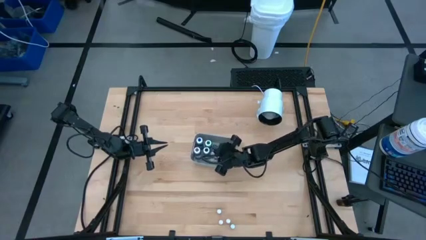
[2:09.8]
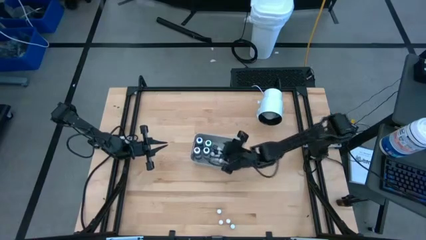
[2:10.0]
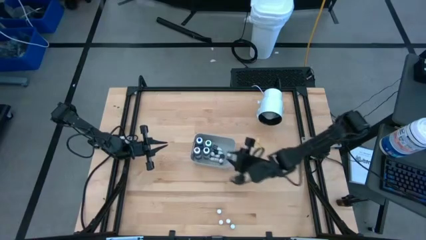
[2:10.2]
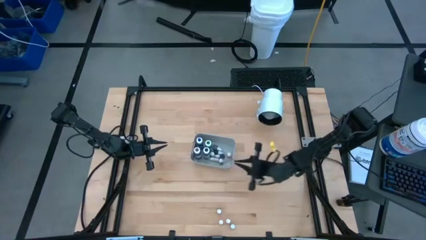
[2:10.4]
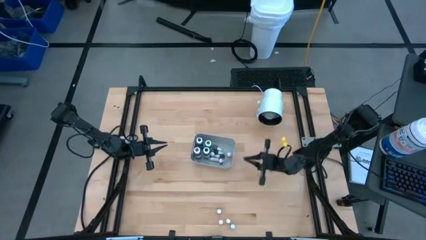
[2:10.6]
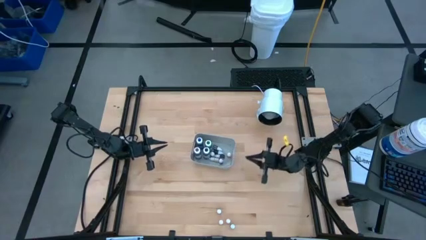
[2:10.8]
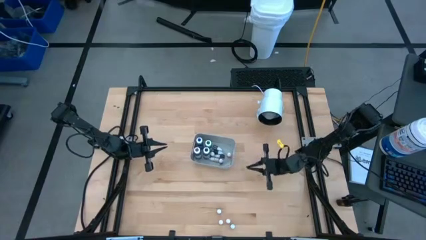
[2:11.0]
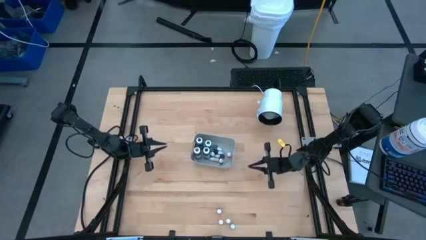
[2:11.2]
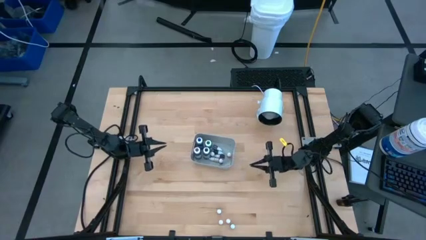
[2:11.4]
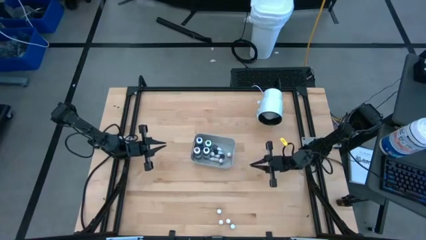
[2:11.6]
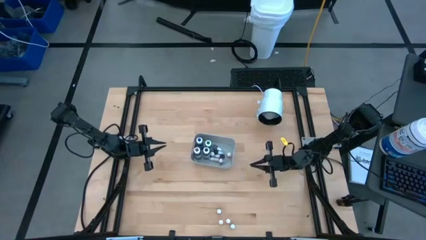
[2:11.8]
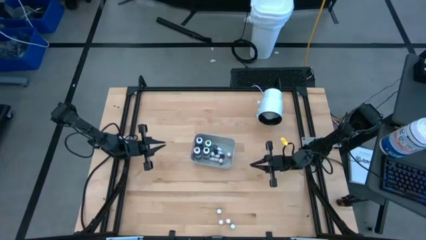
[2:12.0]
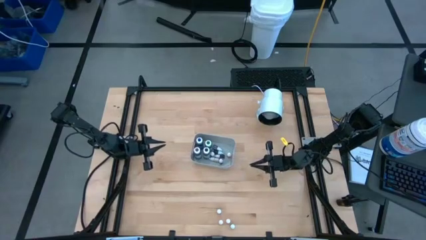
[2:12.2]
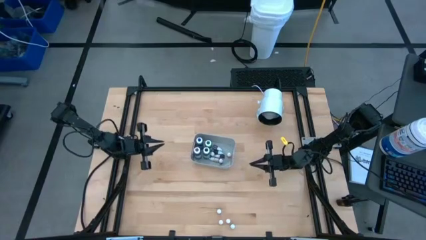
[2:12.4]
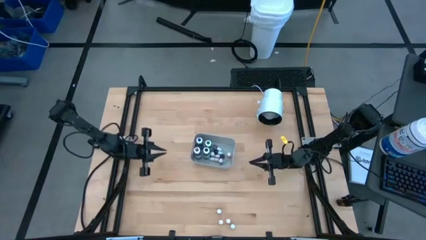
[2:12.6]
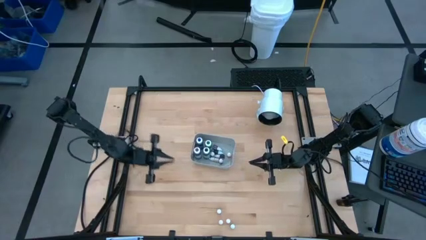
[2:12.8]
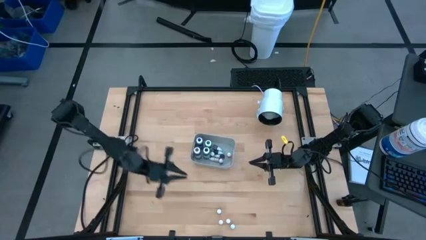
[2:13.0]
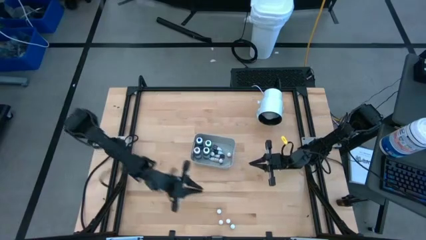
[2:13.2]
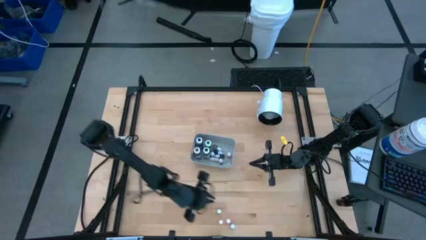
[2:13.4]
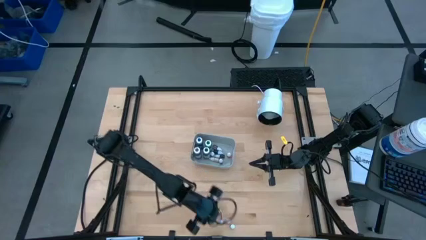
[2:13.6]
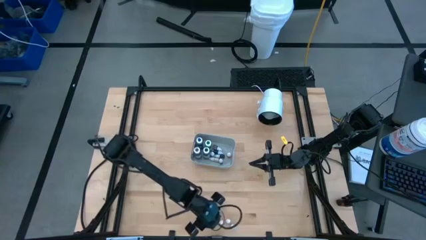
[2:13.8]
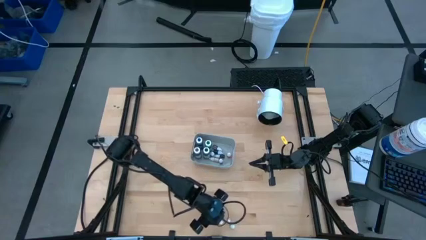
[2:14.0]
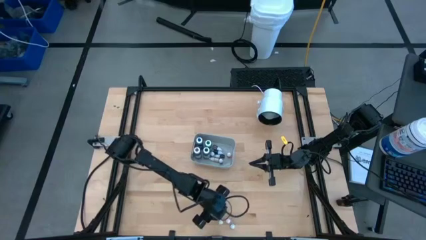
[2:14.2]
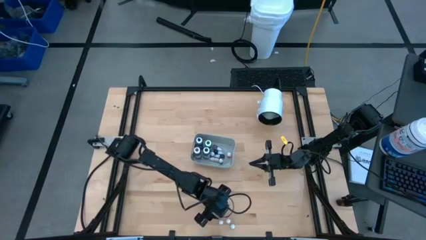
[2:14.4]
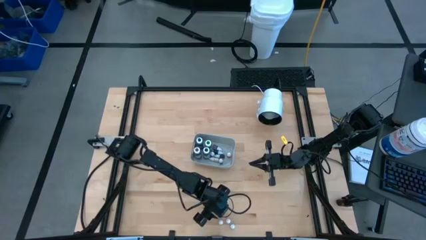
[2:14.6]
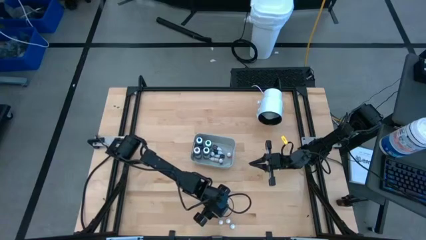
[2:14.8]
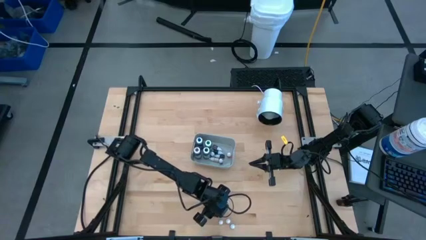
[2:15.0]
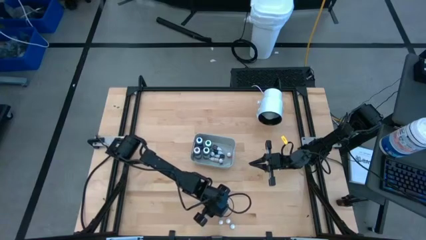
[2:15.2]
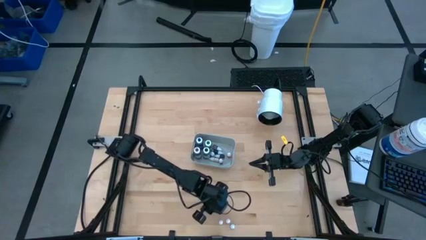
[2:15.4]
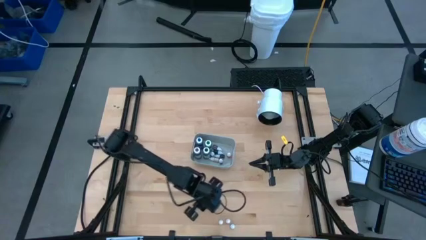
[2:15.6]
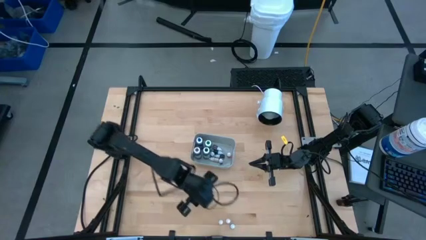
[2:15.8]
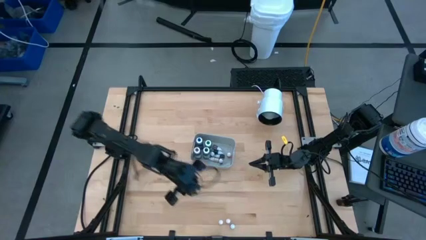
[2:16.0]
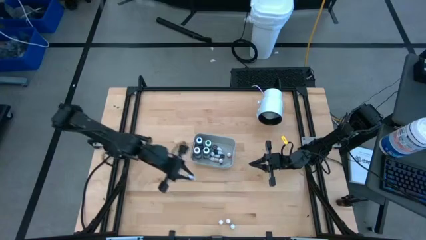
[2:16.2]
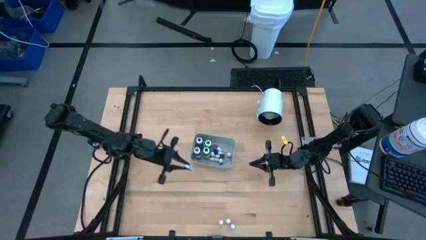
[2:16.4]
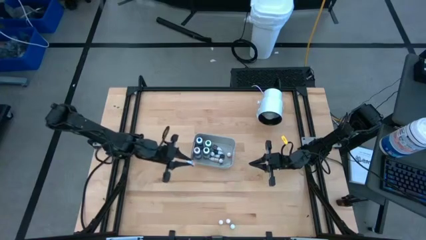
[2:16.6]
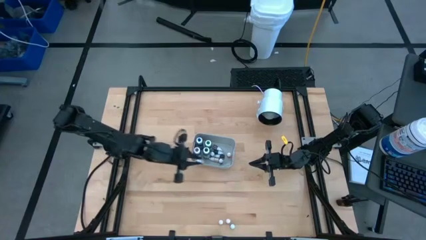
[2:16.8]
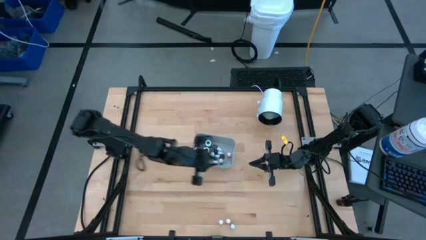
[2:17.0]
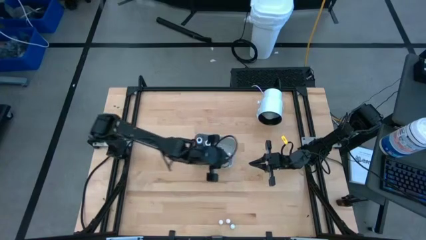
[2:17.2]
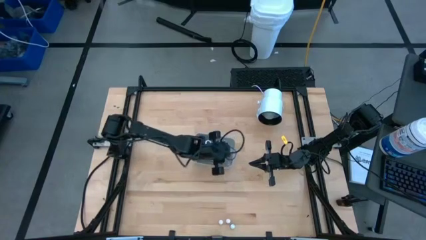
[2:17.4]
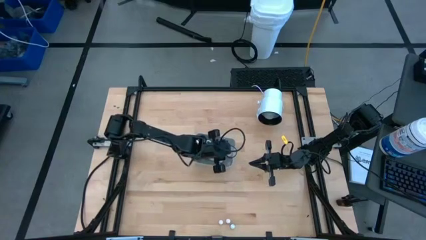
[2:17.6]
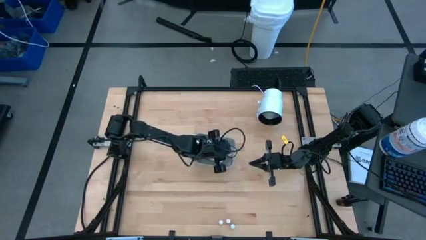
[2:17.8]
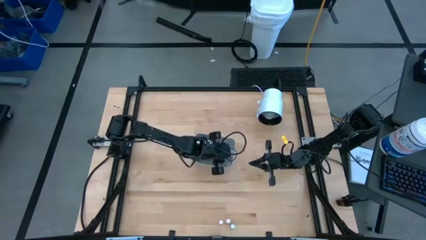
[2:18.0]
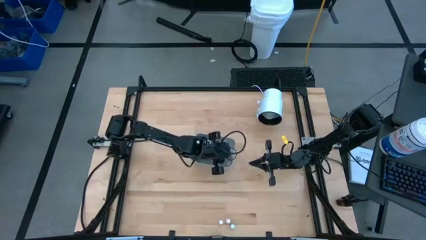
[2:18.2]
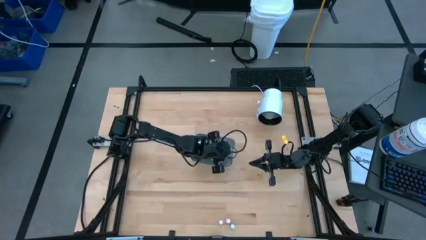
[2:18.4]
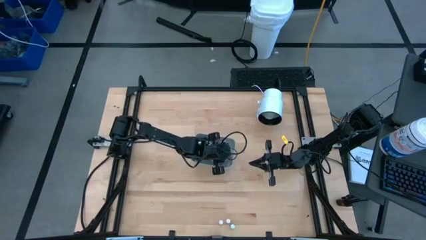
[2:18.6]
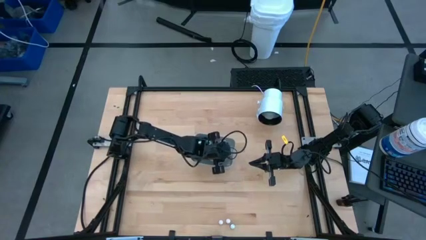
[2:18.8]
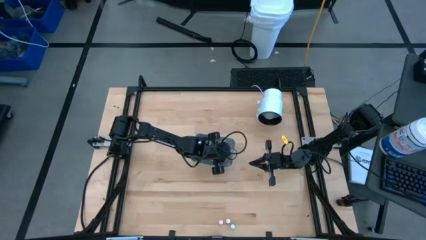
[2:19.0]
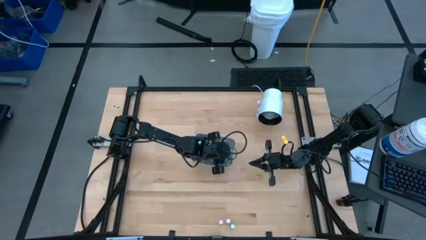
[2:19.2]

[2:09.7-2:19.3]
Task: Pick & Place food coloring
Put the red food coloring bottle into the gray bin

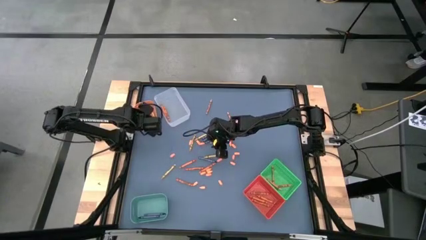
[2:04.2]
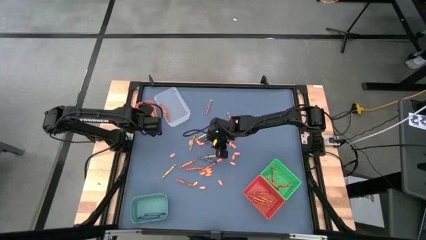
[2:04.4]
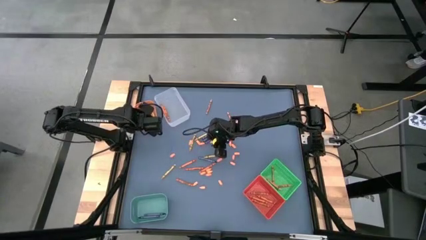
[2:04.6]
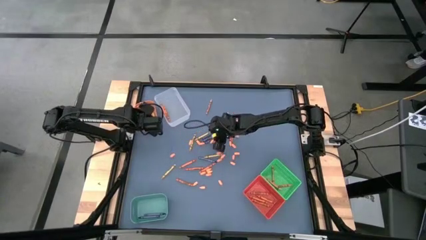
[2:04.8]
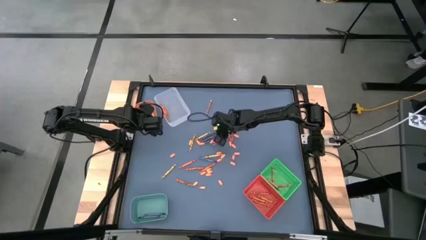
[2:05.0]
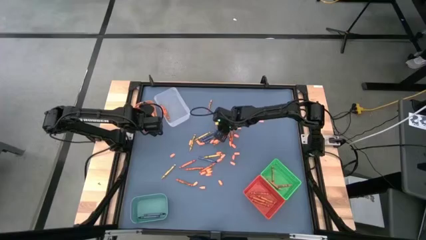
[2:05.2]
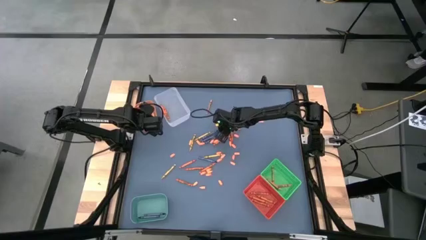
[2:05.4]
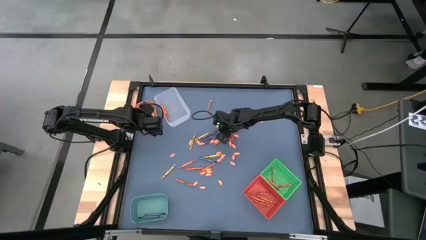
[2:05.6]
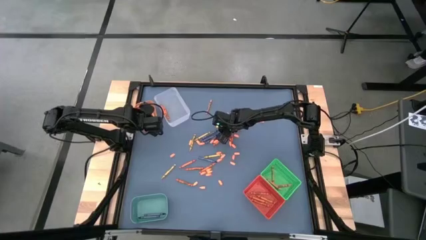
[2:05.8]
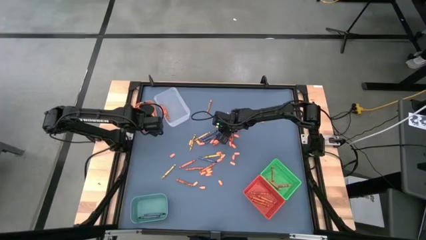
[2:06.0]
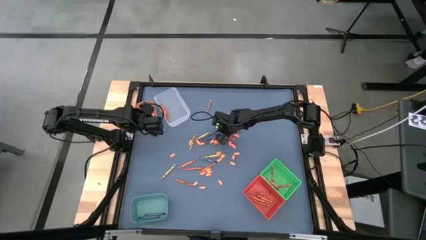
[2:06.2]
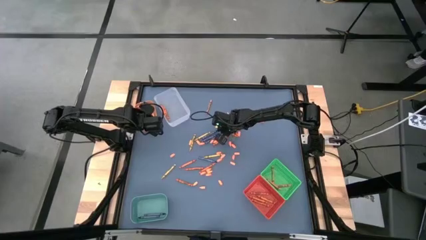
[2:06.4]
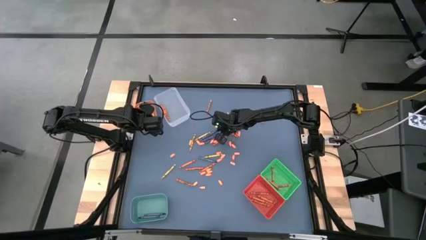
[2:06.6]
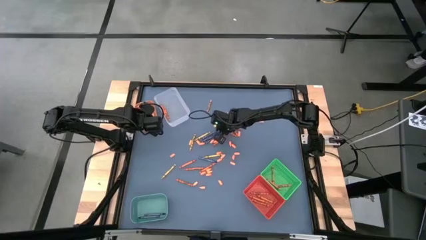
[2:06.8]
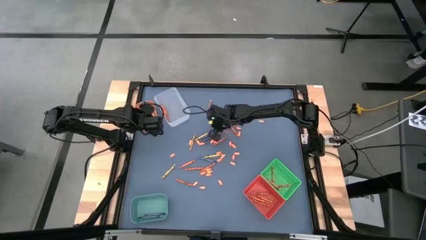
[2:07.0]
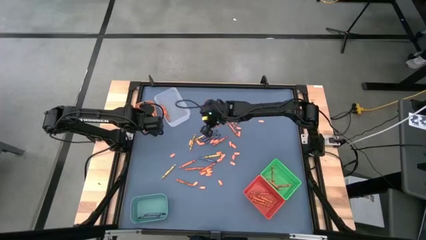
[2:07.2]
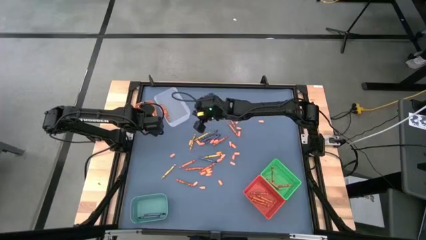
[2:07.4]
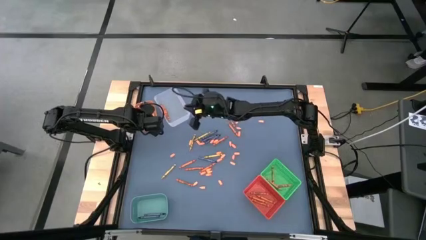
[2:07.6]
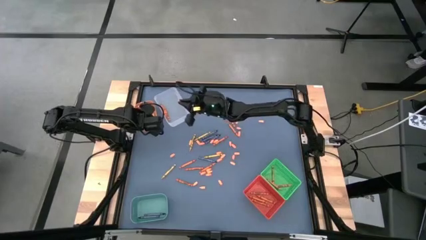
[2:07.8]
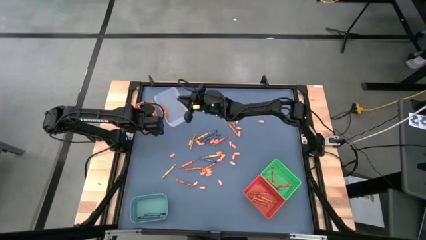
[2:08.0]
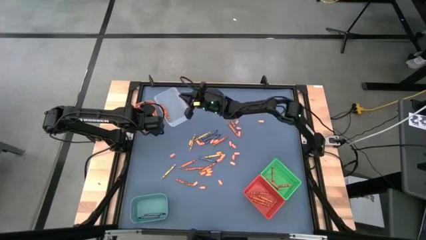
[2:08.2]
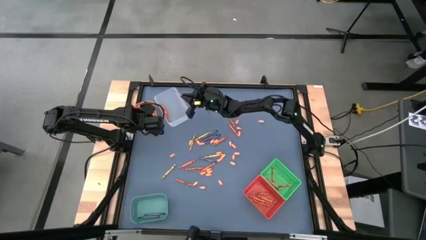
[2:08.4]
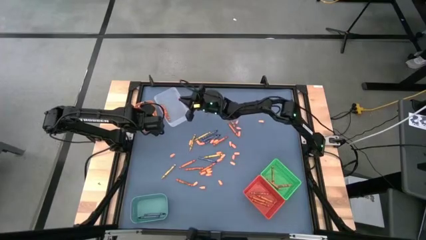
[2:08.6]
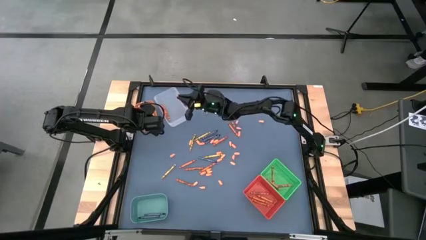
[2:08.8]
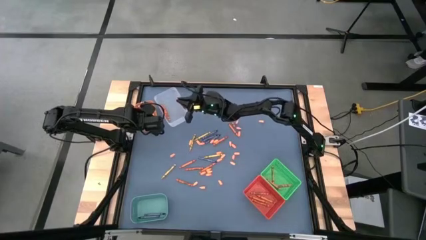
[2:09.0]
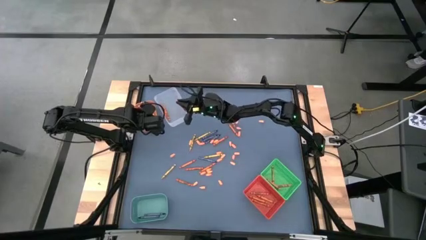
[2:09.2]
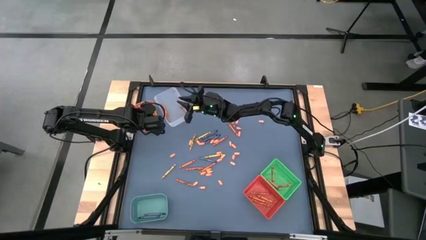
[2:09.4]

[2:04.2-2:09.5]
Task: Sort crayons
Put the orange crayon into the transparent bin
